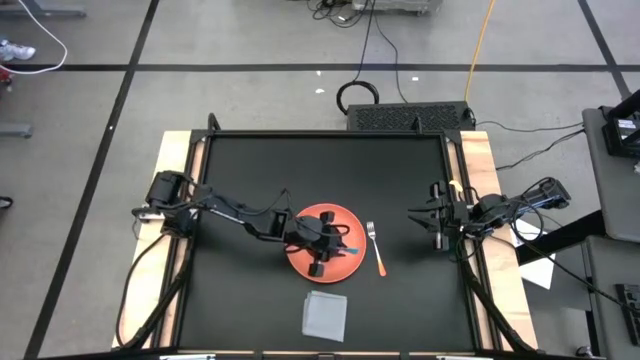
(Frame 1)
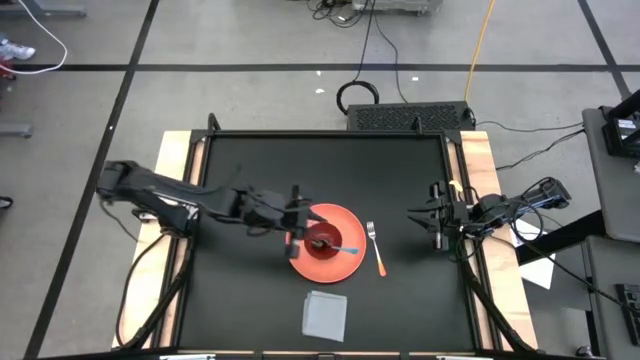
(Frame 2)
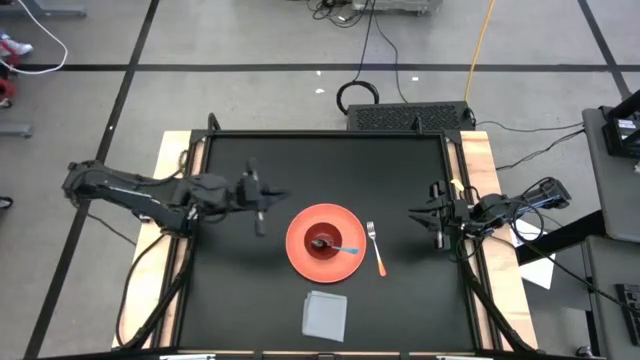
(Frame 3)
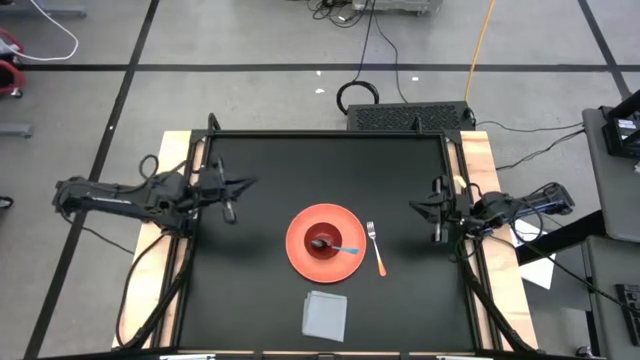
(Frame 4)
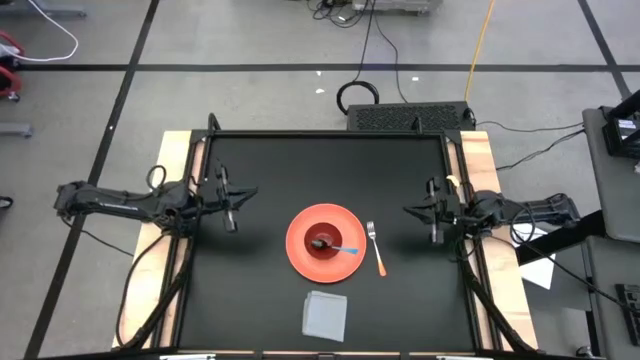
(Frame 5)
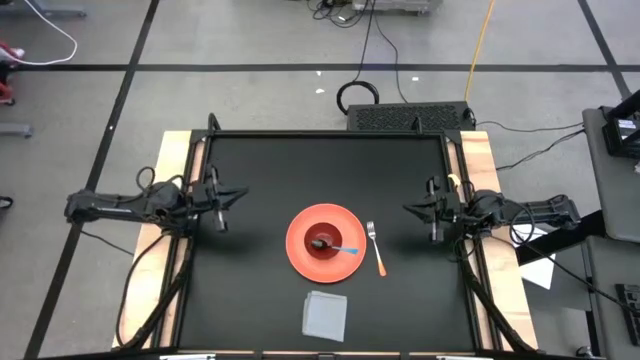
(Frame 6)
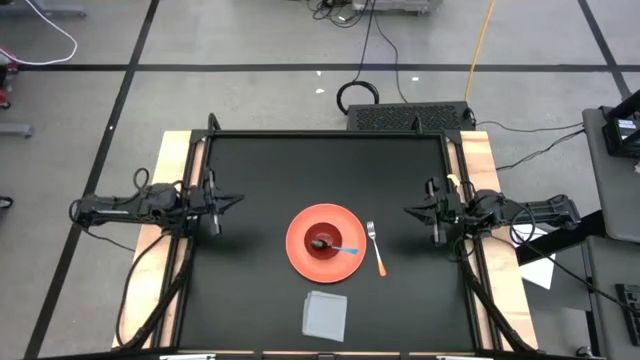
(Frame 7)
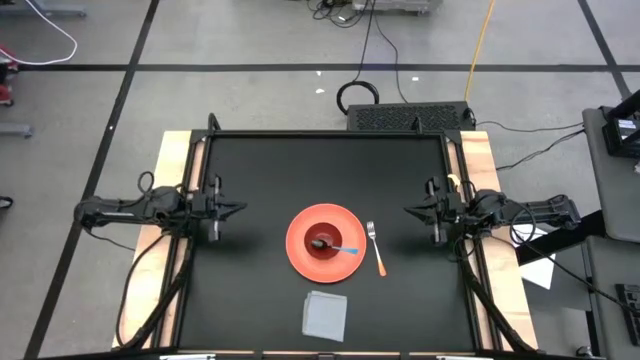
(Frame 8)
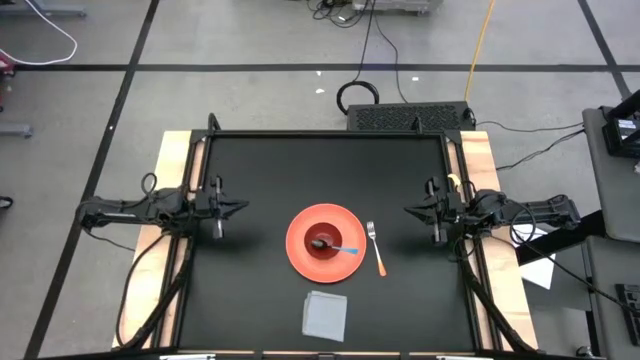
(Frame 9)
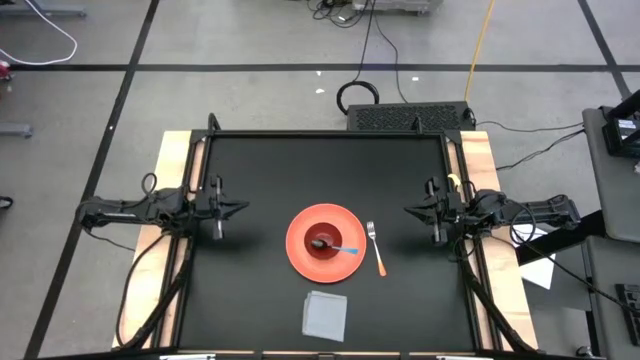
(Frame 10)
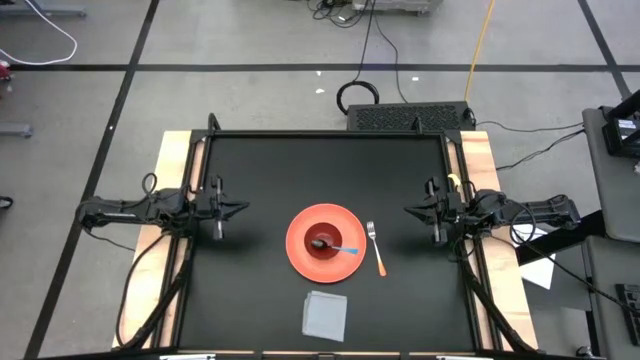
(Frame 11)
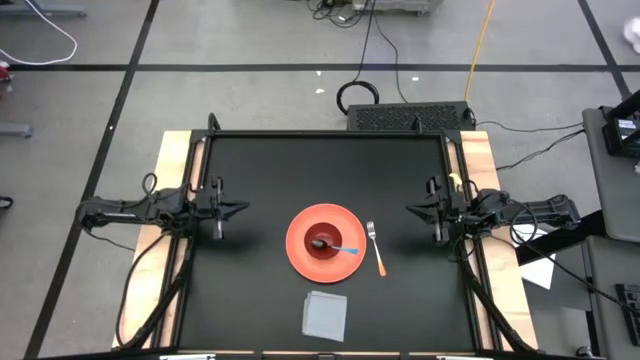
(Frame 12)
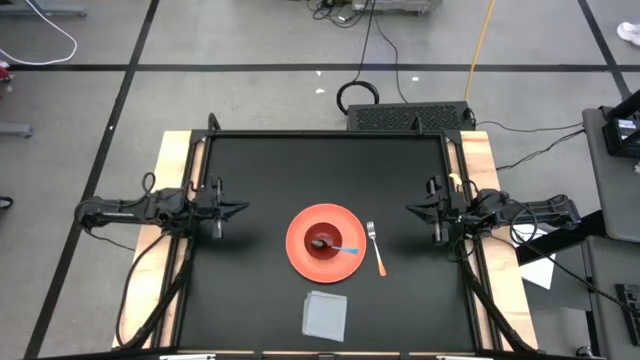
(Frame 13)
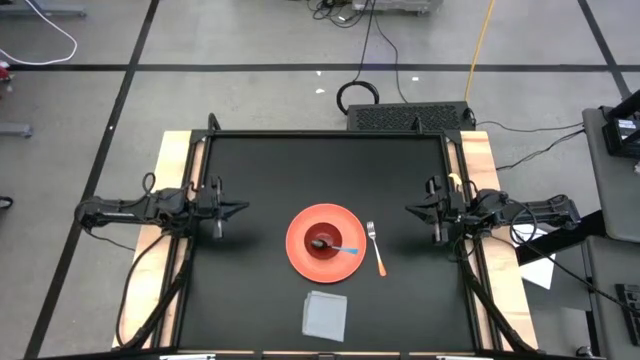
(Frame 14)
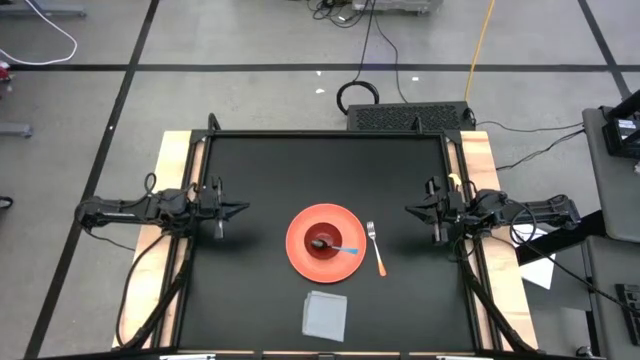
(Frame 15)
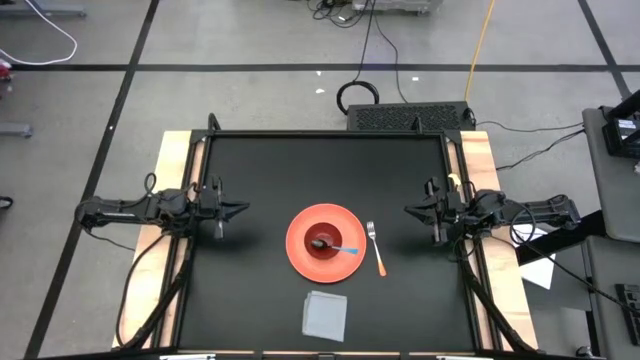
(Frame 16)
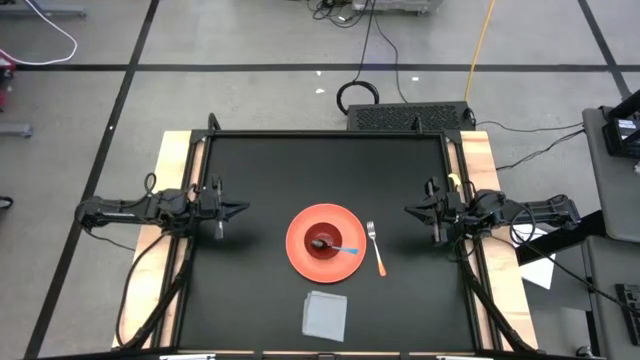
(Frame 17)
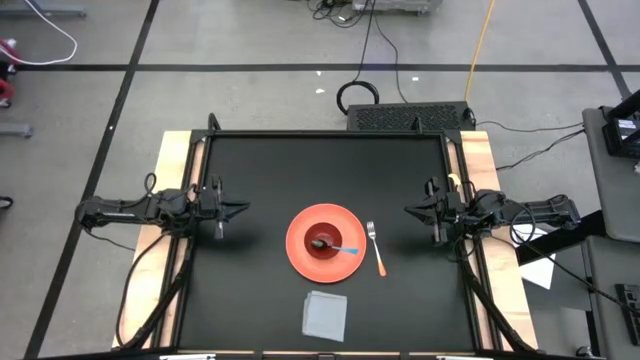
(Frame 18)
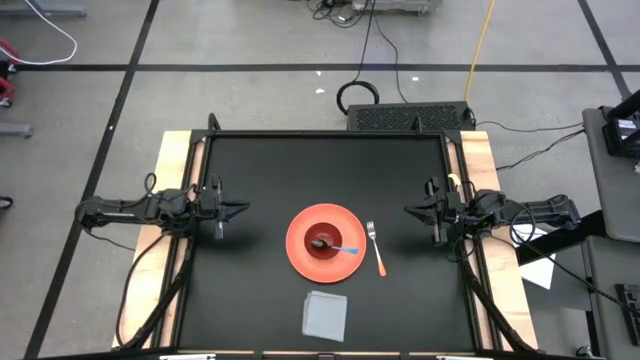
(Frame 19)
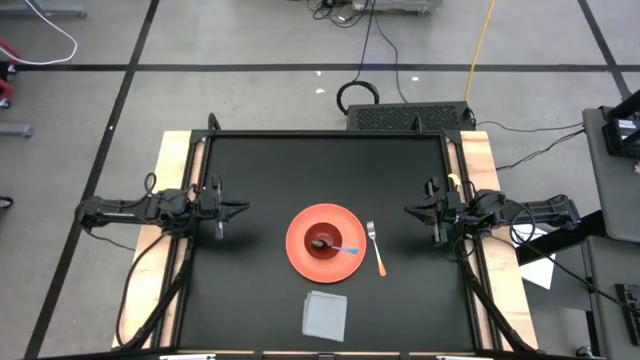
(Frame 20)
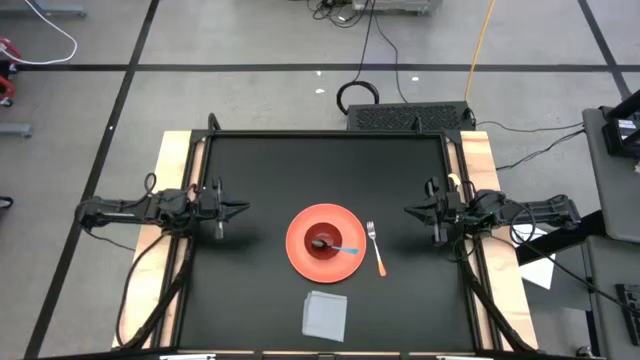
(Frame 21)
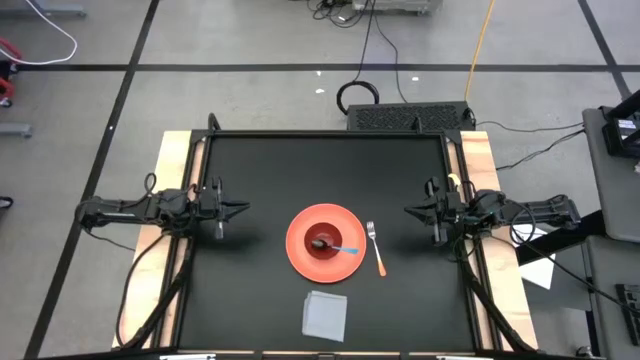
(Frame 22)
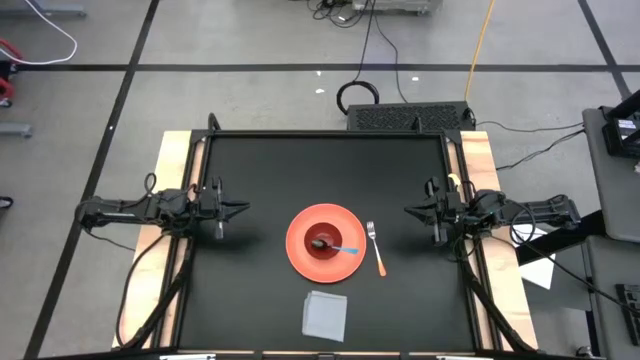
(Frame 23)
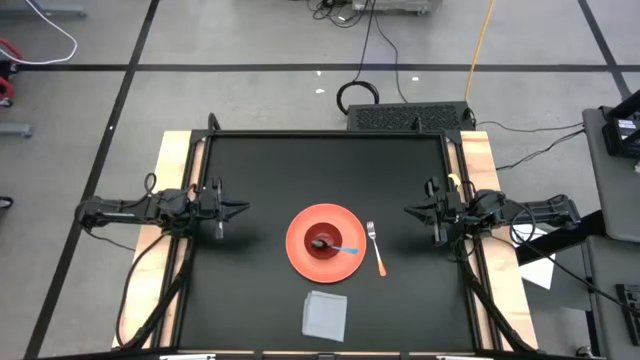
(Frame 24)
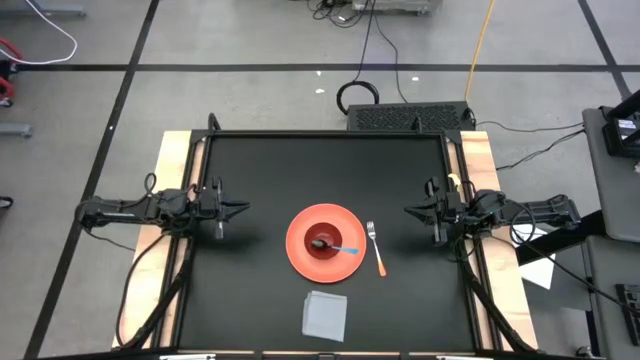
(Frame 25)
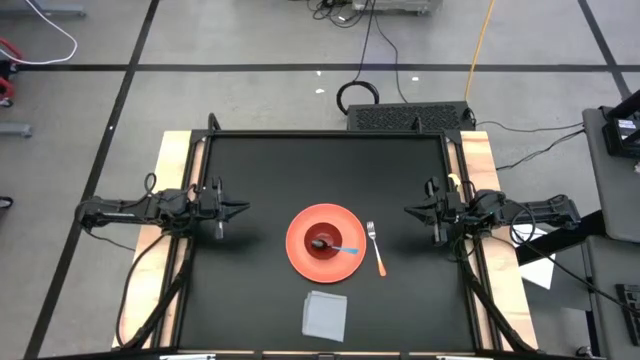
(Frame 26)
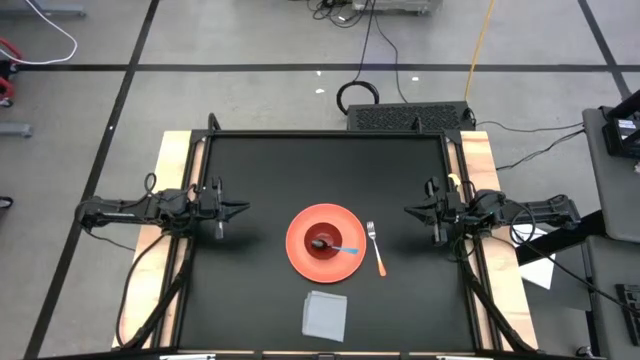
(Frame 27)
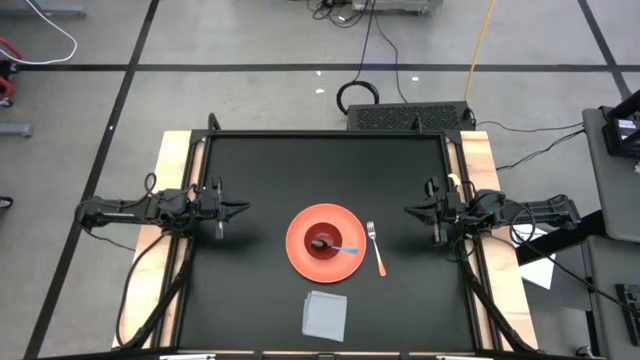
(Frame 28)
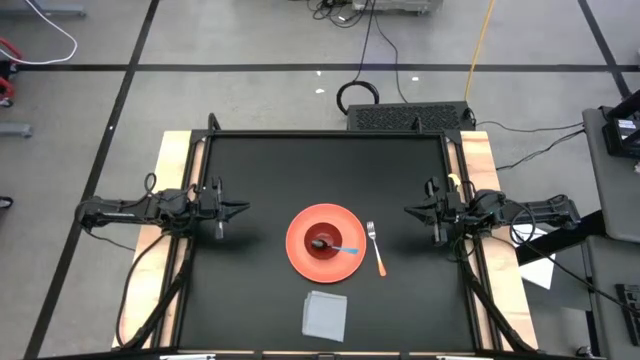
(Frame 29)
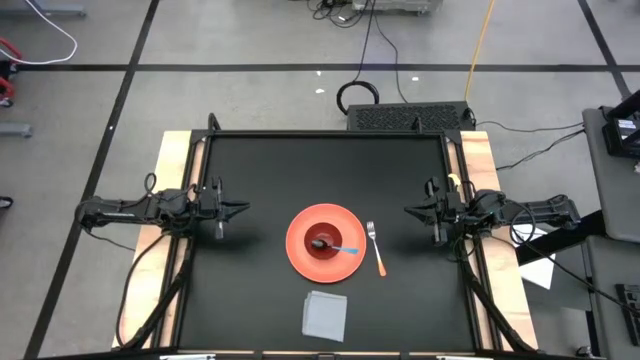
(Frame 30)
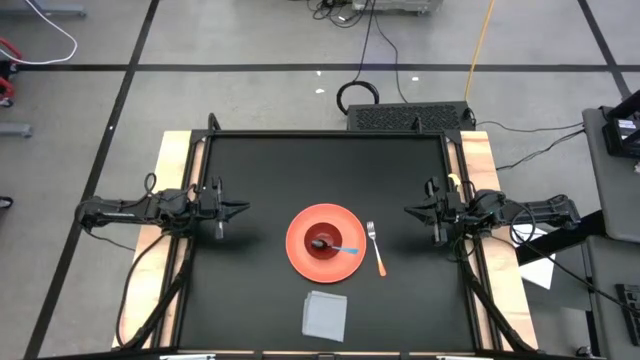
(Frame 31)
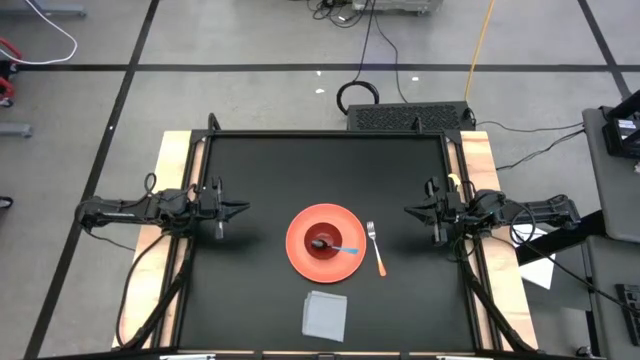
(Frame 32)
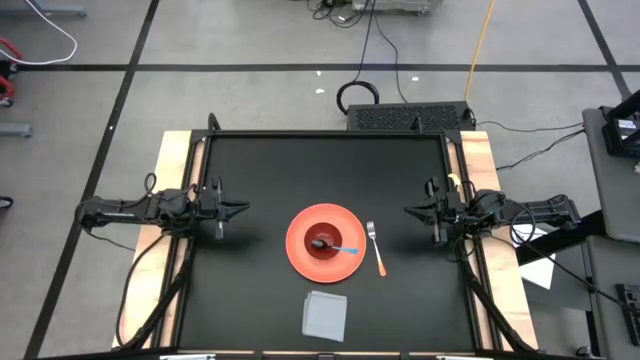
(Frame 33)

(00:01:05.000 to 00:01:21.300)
Task: Set table place
Return to Home Position

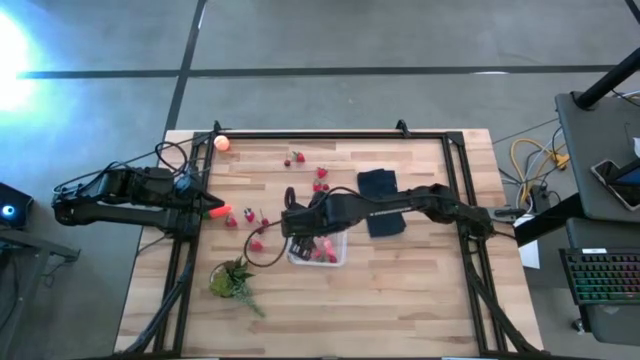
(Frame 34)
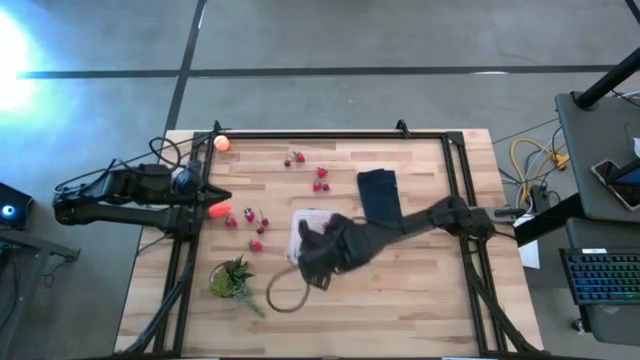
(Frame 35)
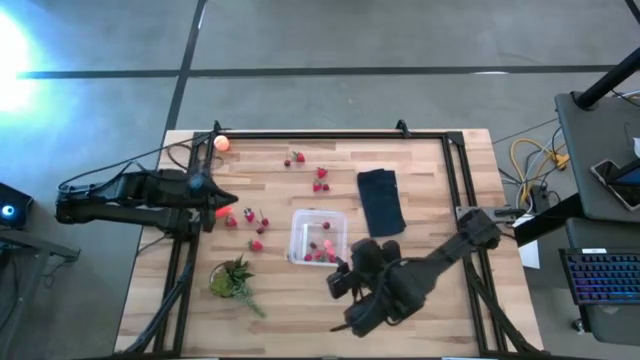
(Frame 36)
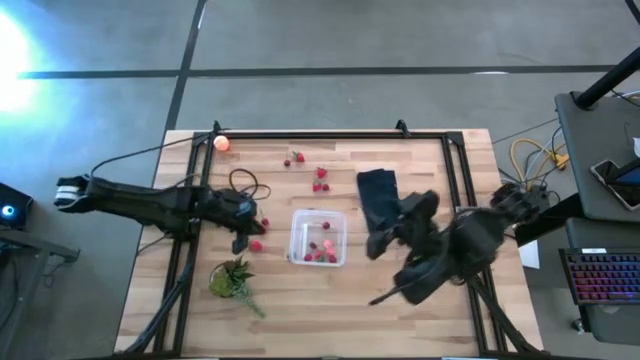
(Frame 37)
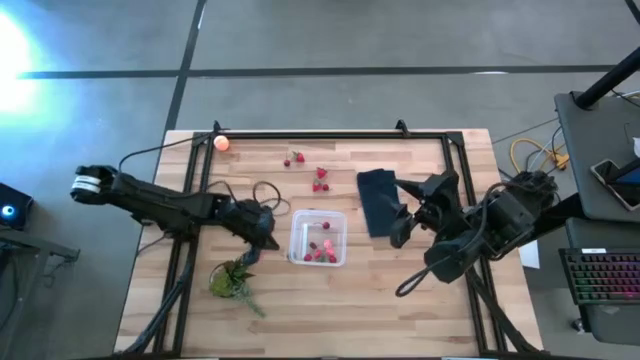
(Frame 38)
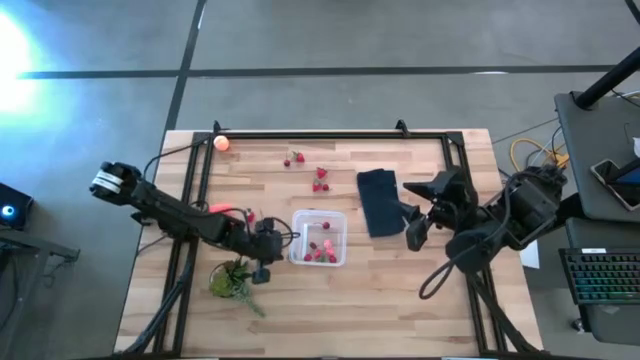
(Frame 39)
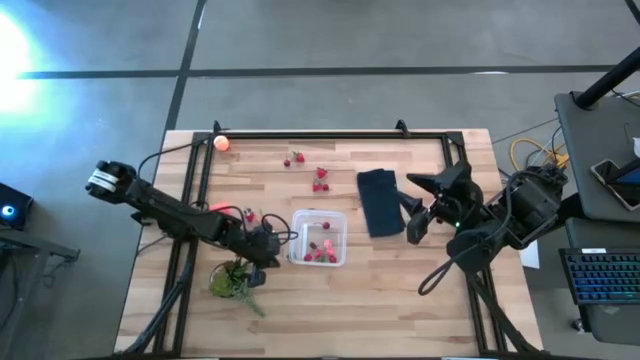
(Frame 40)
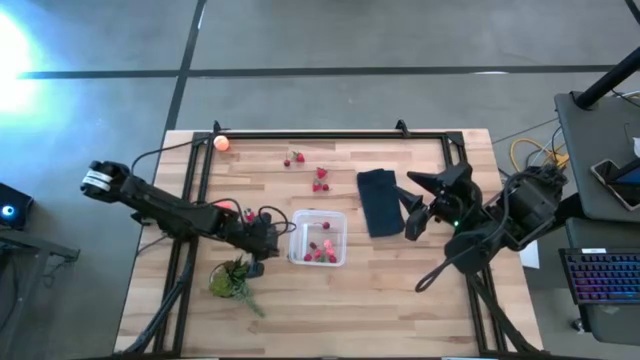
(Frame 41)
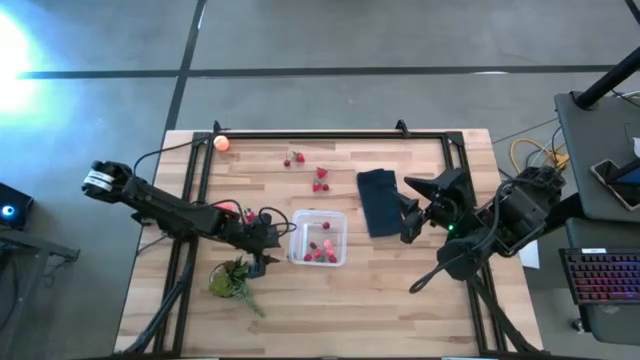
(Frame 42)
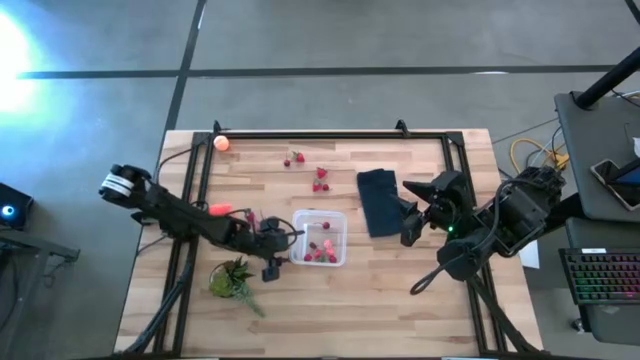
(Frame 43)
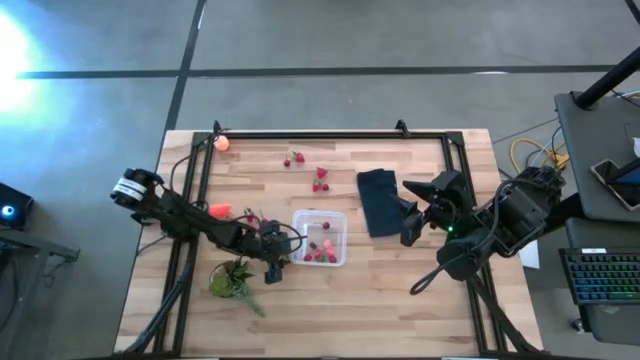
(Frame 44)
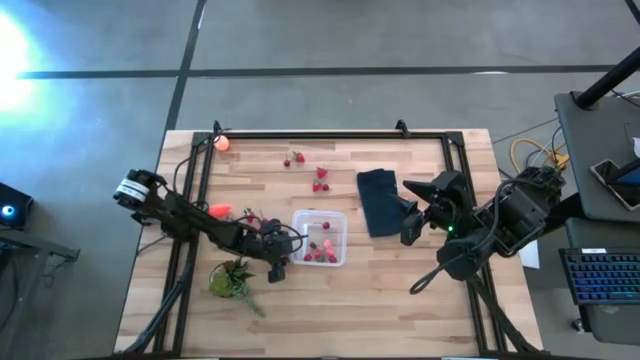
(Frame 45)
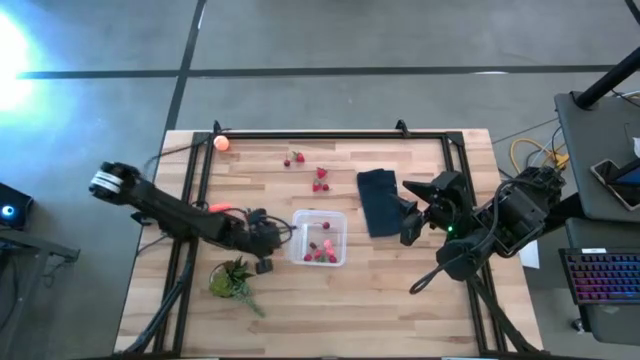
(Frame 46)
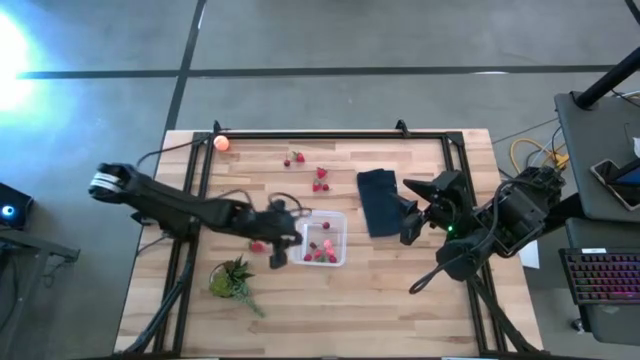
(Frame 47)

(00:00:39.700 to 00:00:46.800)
Task: Pick and placing Produce into tupperware
Put the blackberry into the transparent bin
